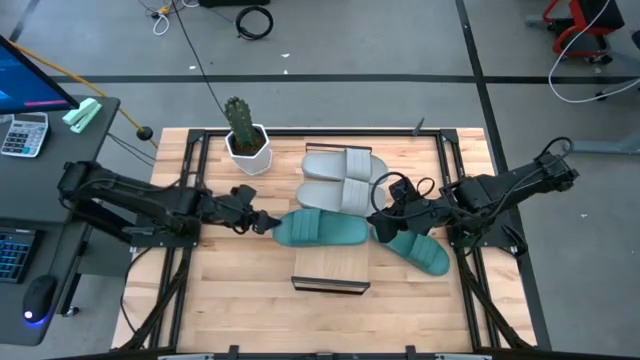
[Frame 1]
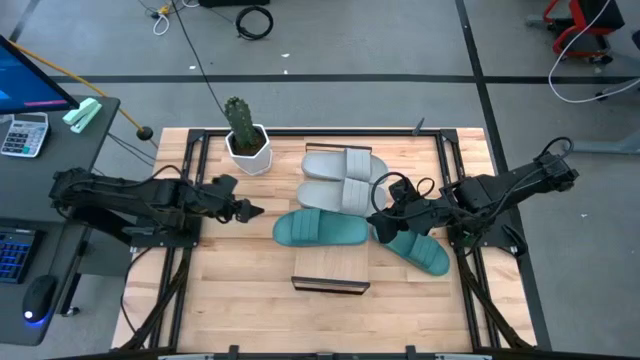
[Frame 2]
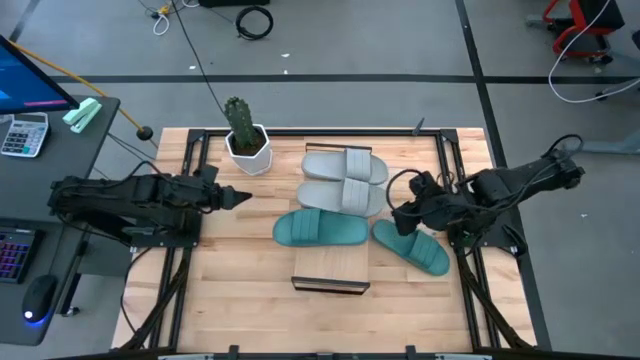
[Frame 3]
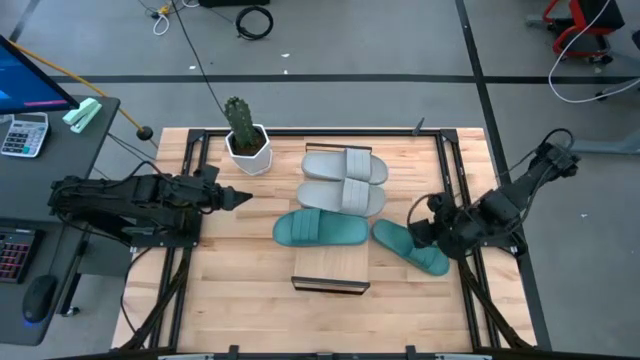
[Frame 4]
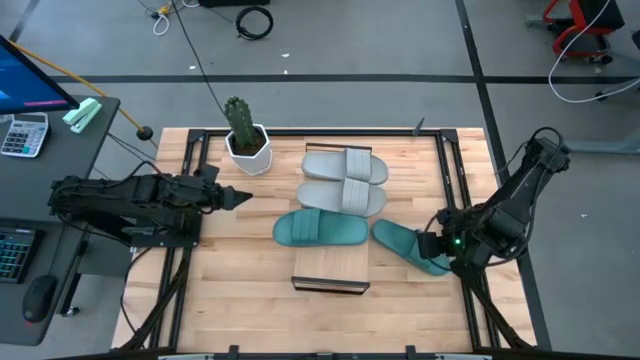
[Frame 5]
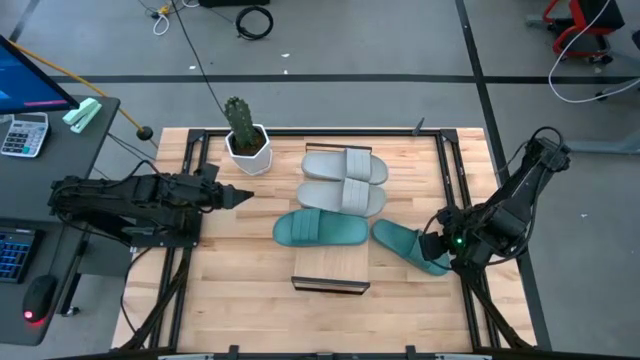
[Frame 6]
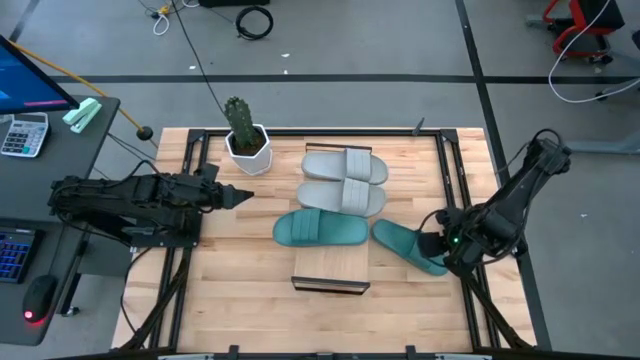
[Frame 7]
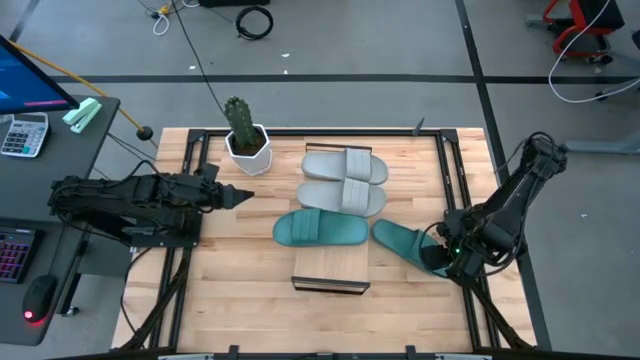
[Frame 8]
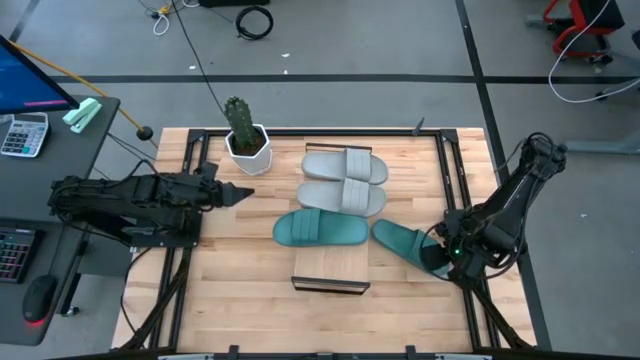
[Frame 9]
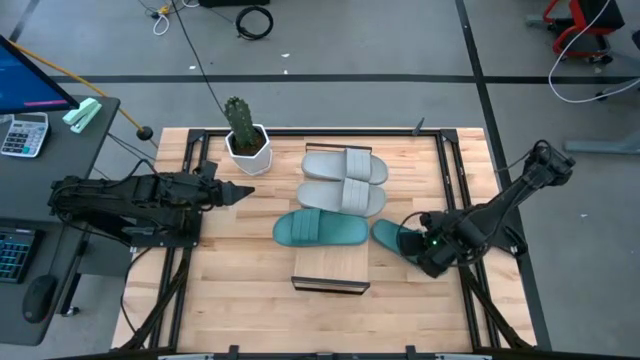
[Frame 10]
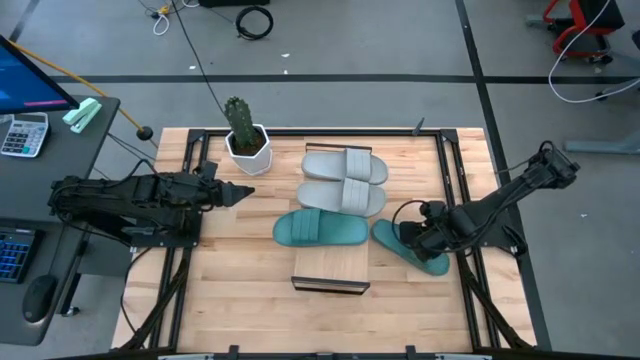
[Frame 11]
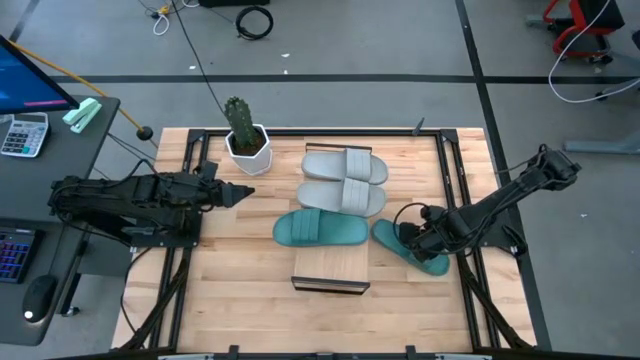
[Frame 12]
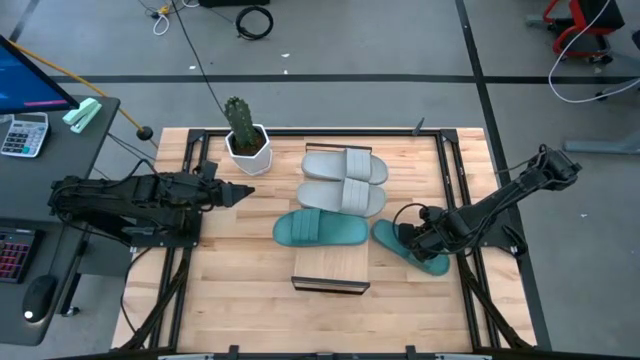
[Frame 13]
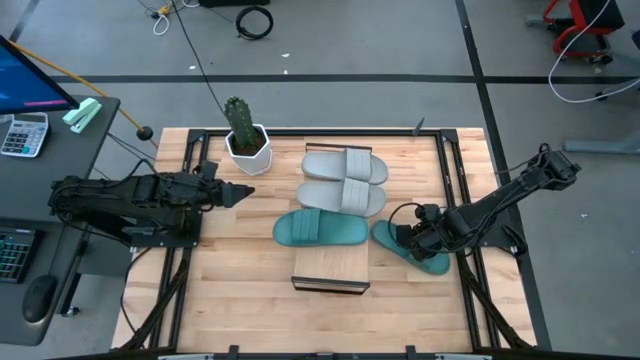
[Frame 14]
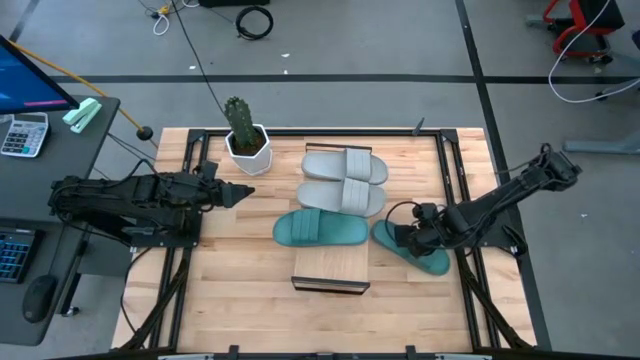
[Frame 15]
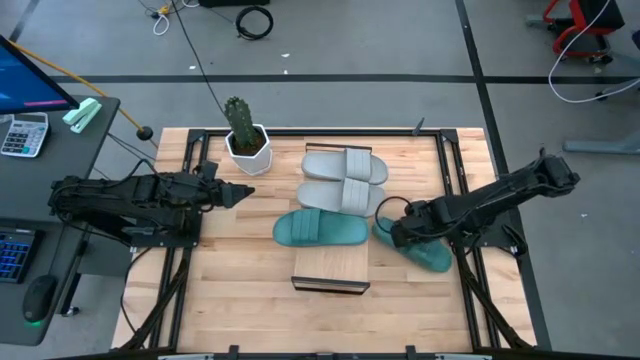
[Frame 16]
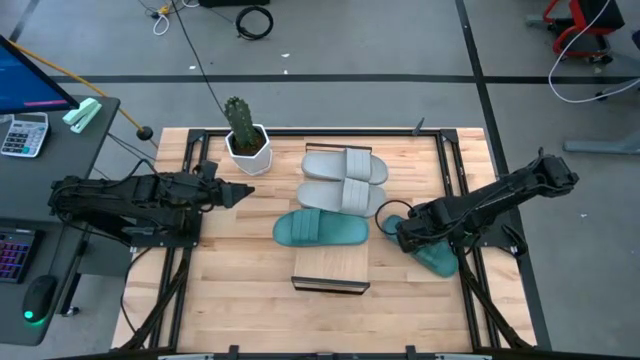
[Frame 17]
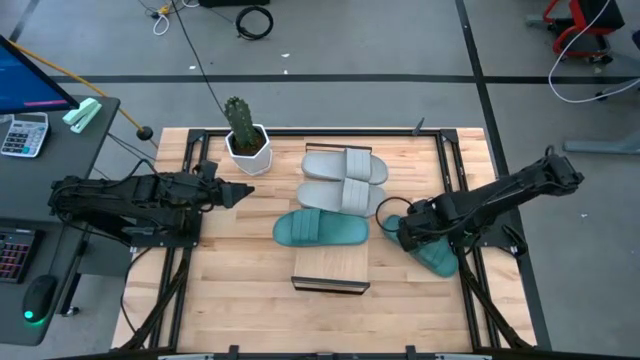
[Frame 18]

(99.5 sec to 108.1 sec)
Task: Pick and place slides into the shelf
Put the green slipper onto the shelf

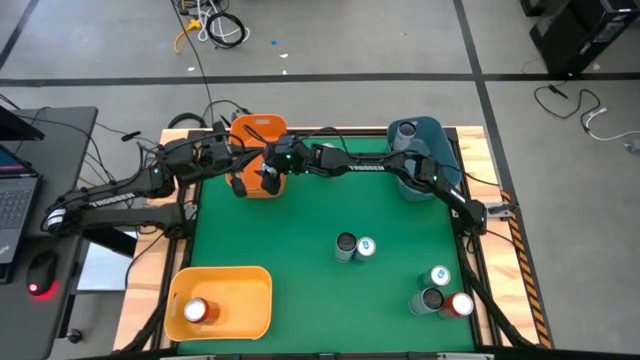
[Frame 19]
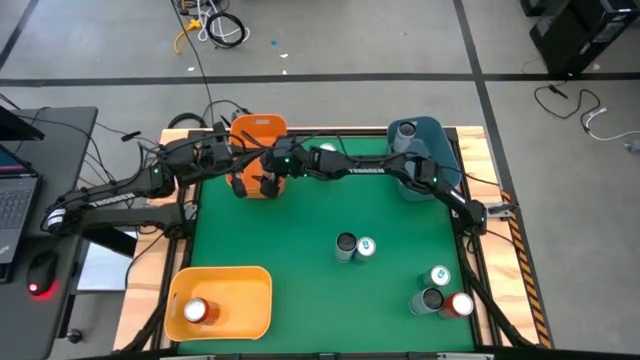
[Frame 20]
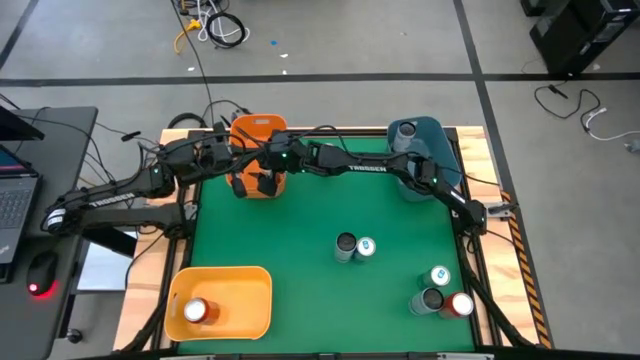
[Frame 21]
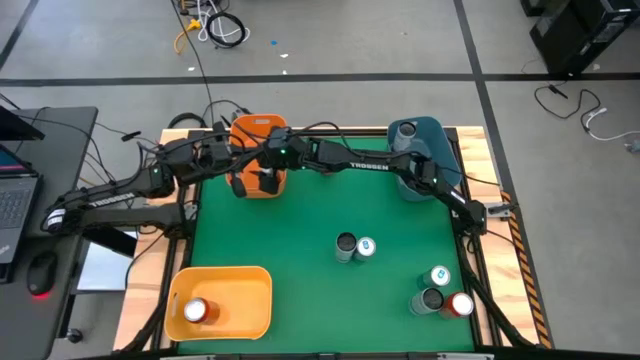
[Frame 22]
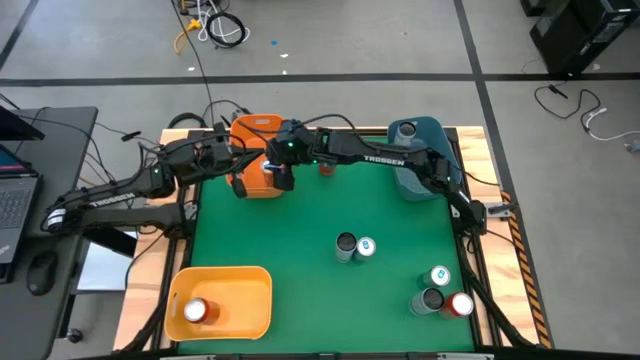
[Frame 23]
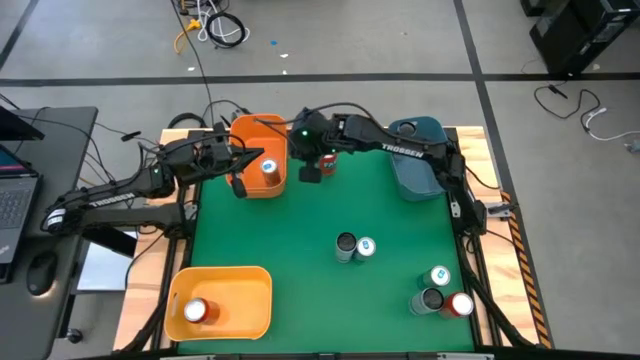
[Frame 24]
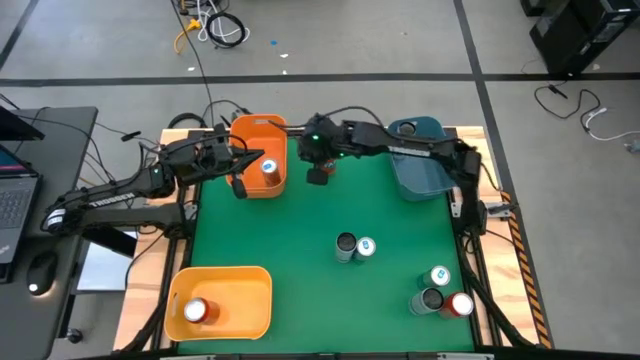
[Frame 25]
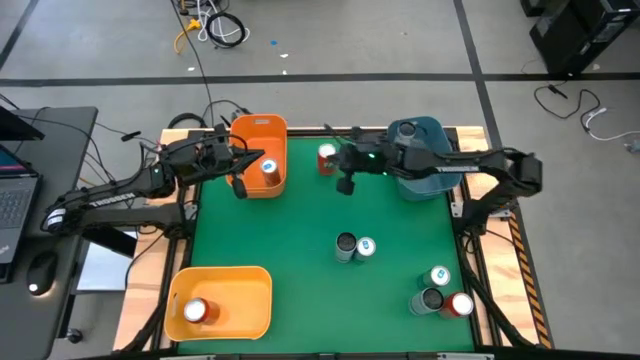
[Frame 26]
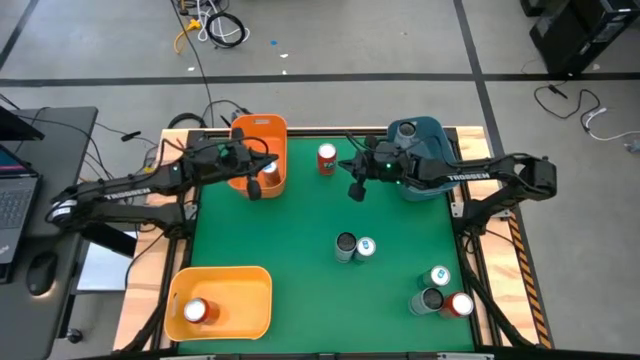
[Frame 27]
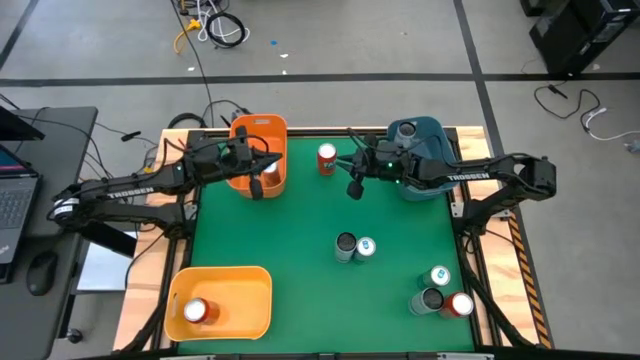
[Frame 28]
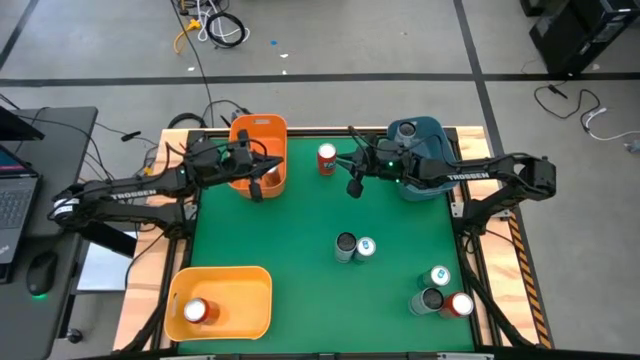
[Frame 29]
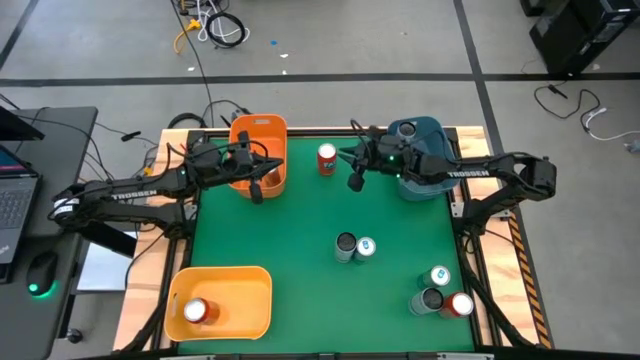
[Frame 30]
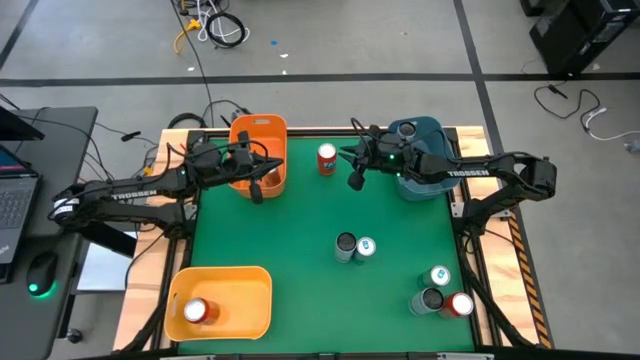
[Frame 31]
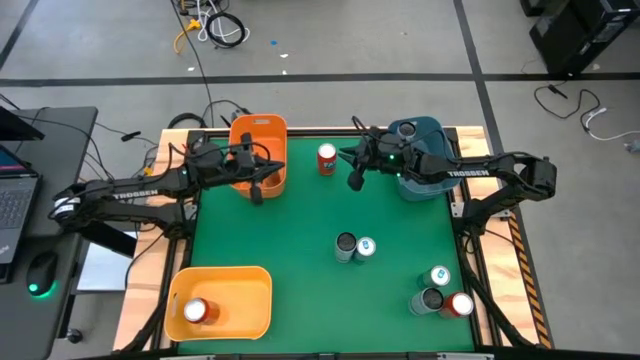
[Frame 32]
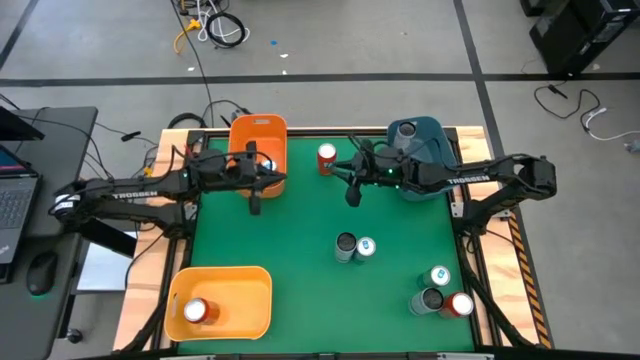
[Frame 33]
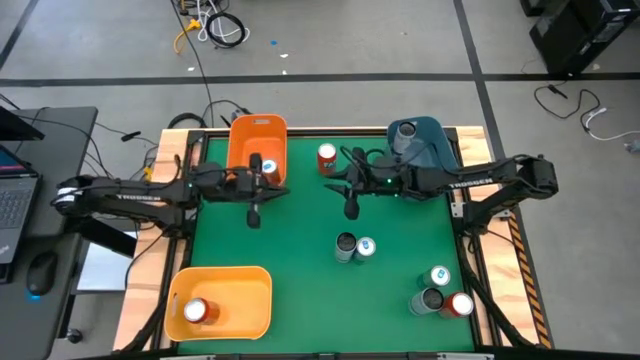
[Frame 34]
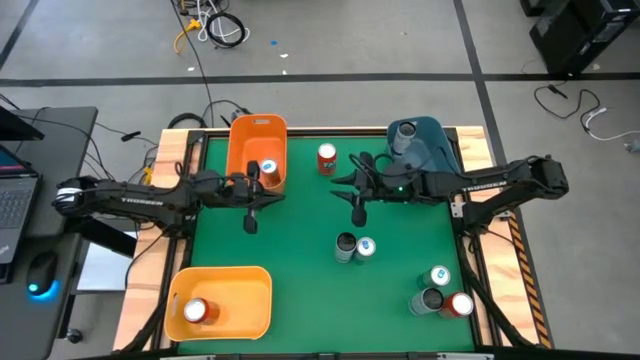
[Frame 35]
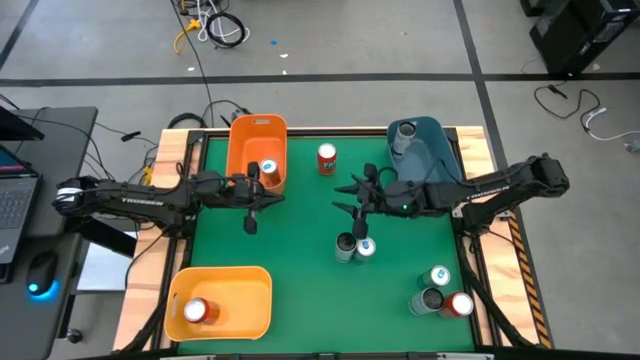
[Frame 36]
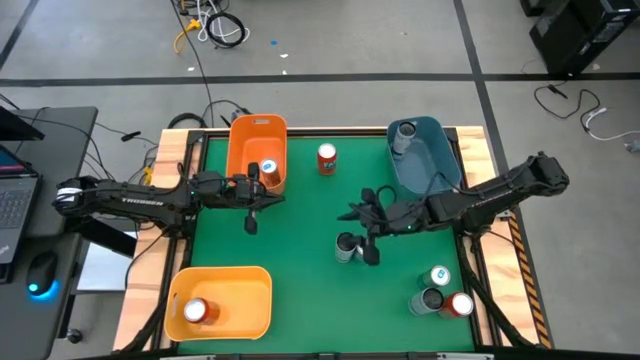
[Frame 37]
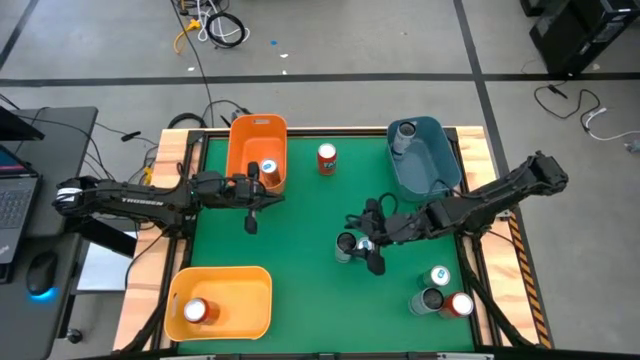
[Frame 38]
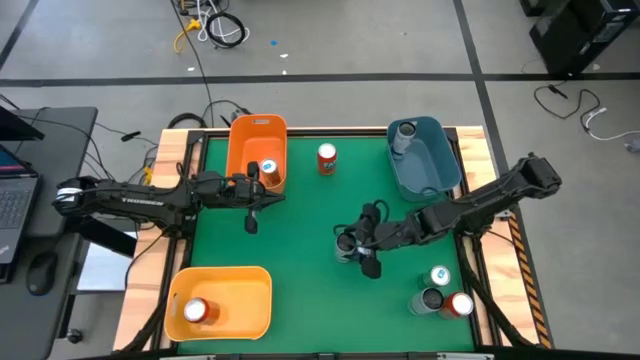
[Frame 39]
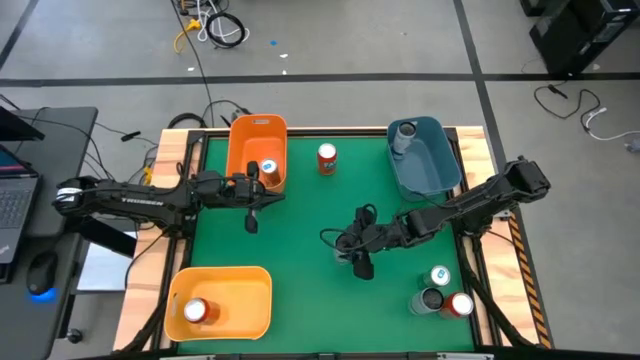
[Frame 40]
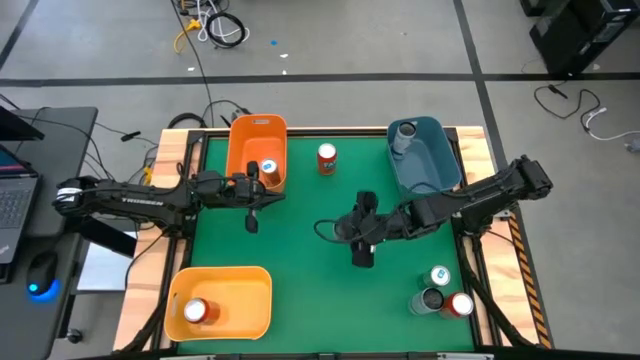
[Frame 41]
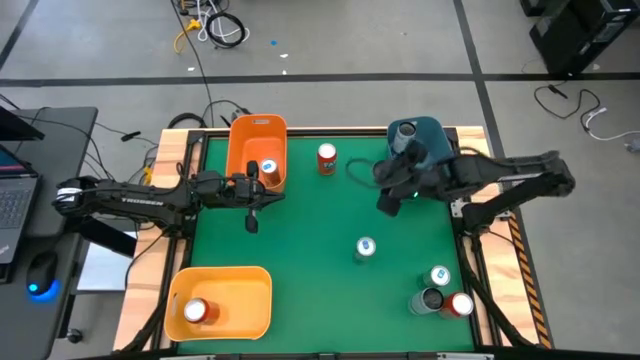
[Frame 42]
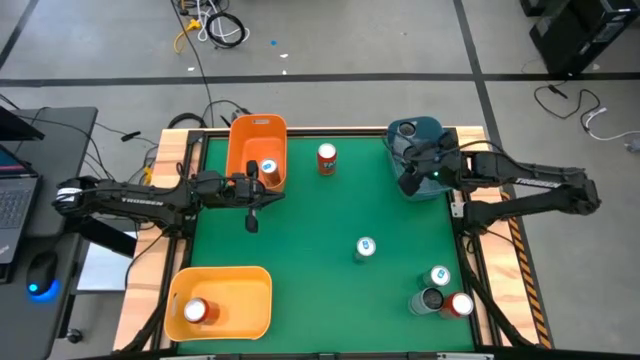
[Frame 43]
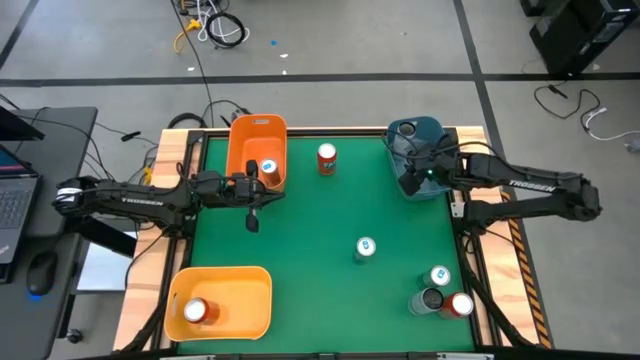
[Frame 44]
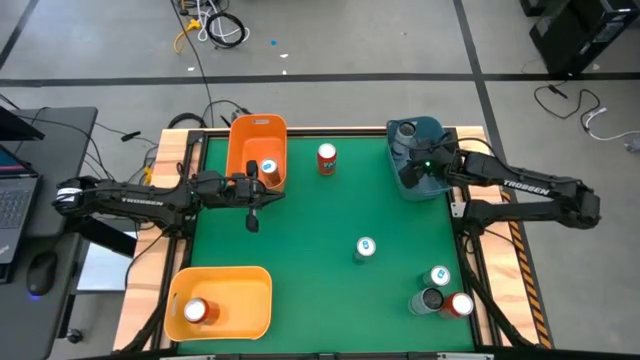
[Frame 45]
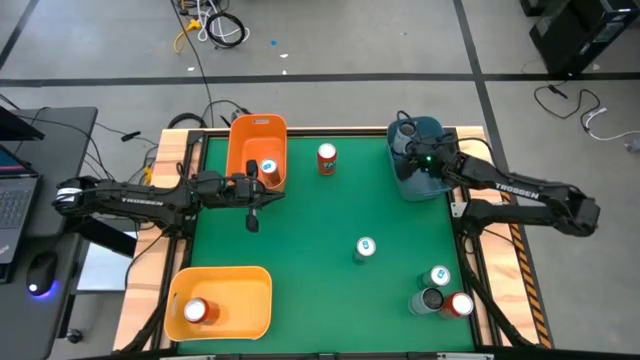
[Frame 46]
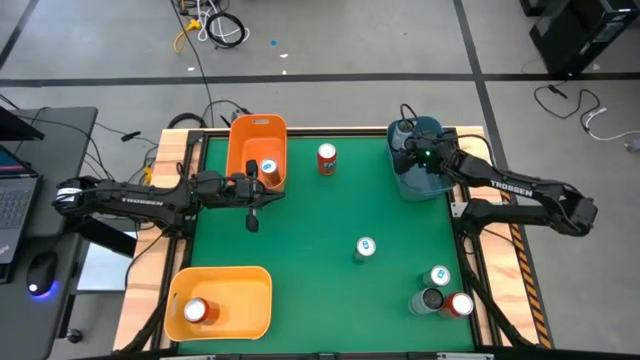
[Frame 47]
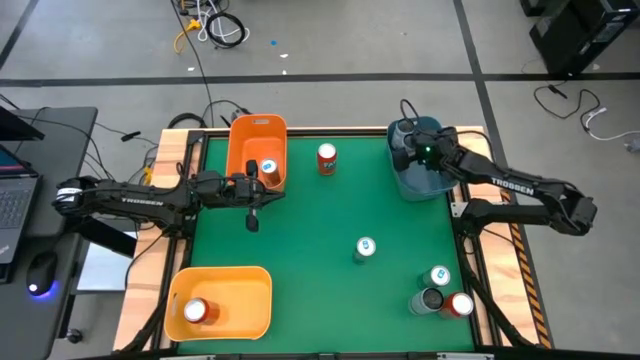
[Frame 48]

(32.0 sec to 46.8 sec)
Task: Sort soda cans
Put the top white-blue soda can into the blue bin
